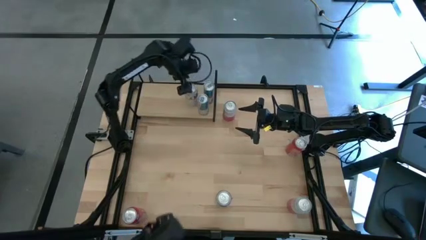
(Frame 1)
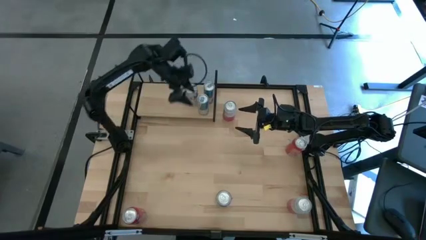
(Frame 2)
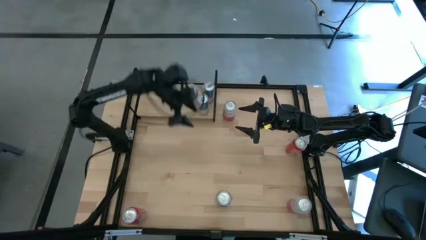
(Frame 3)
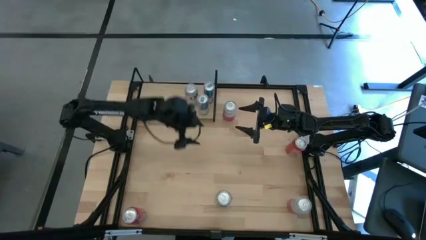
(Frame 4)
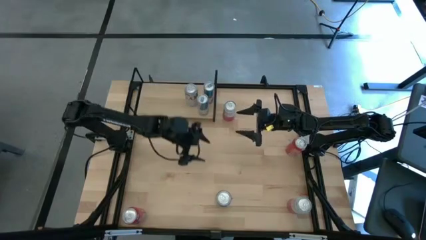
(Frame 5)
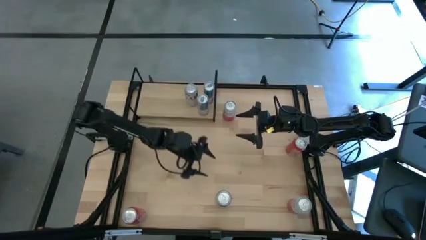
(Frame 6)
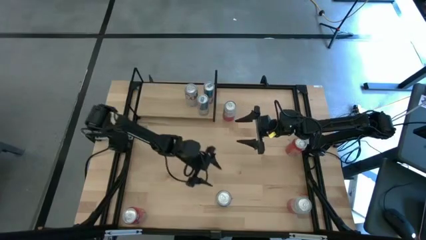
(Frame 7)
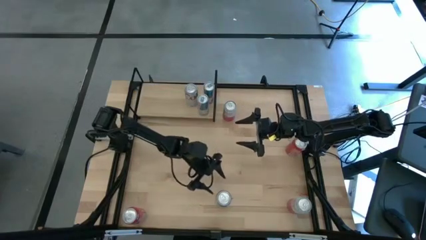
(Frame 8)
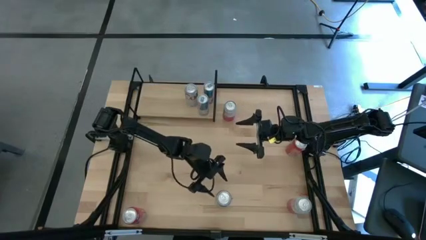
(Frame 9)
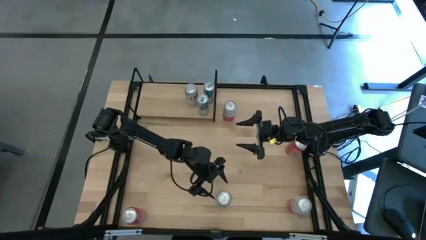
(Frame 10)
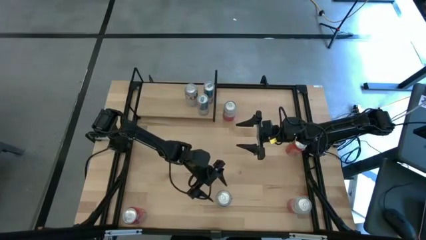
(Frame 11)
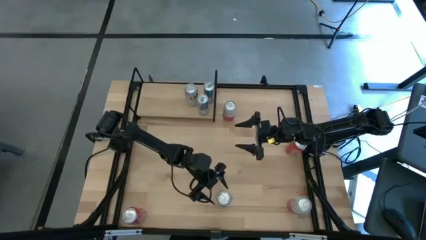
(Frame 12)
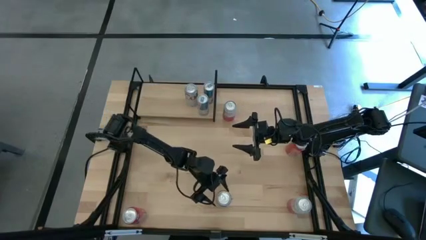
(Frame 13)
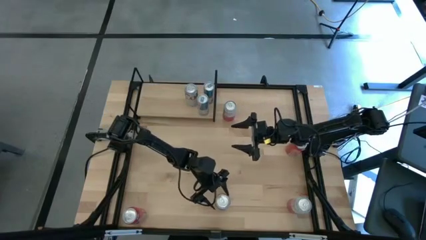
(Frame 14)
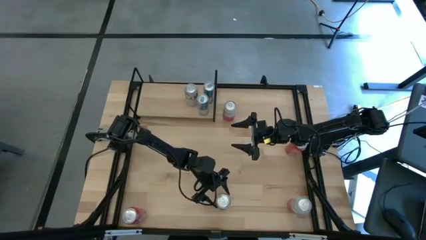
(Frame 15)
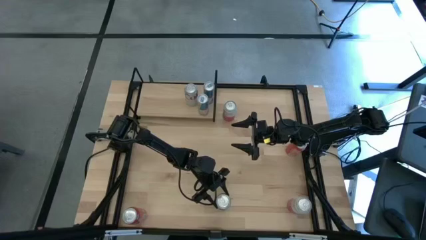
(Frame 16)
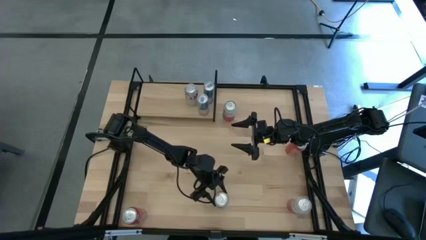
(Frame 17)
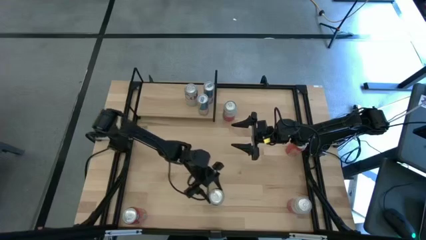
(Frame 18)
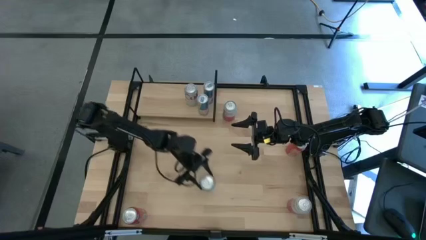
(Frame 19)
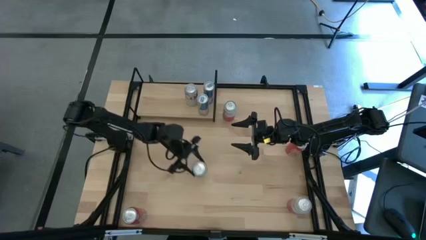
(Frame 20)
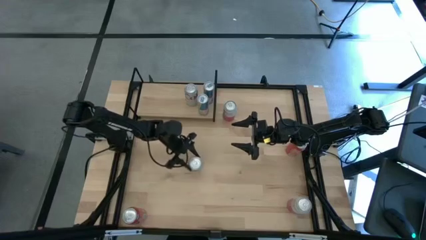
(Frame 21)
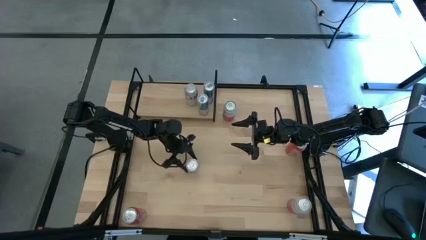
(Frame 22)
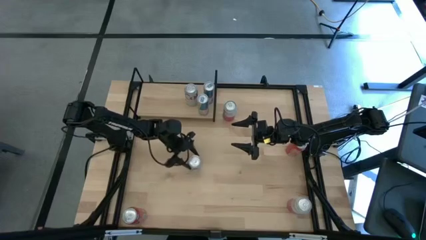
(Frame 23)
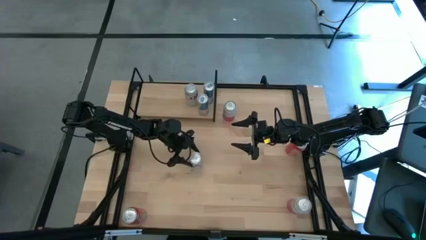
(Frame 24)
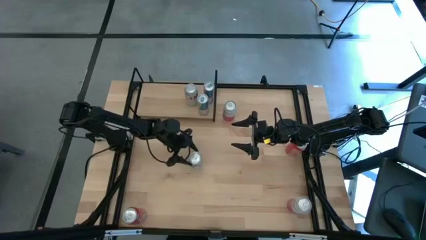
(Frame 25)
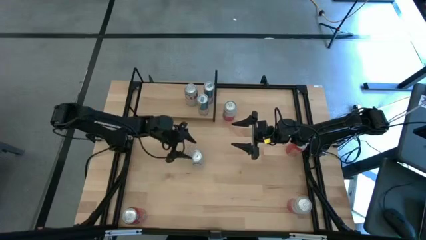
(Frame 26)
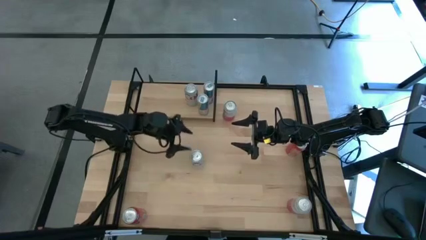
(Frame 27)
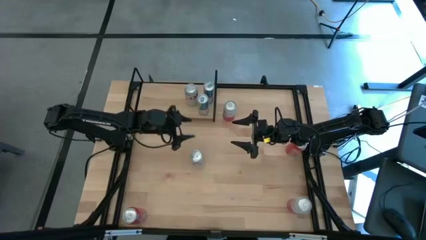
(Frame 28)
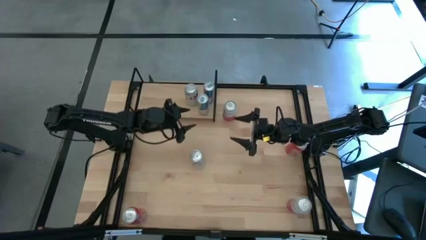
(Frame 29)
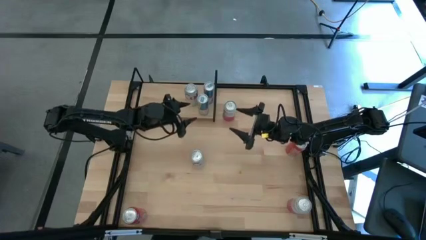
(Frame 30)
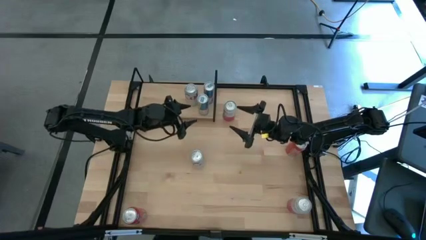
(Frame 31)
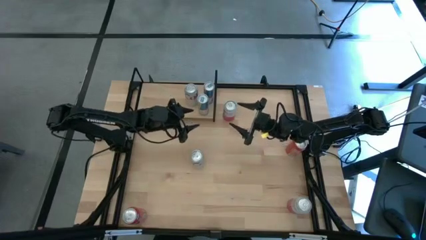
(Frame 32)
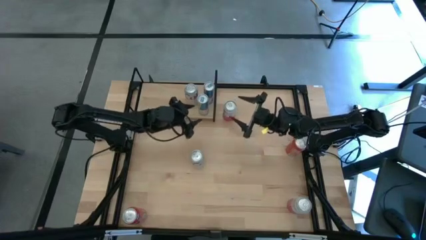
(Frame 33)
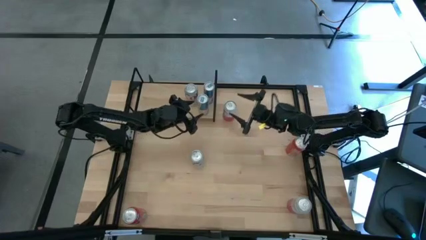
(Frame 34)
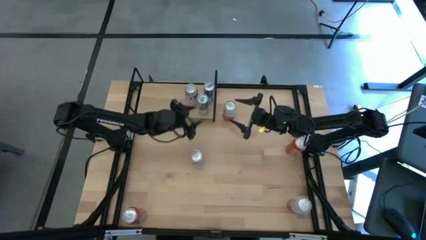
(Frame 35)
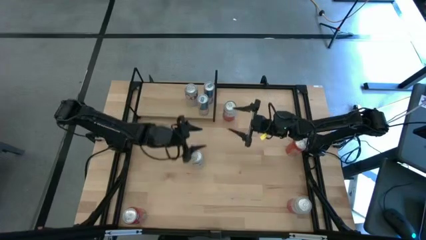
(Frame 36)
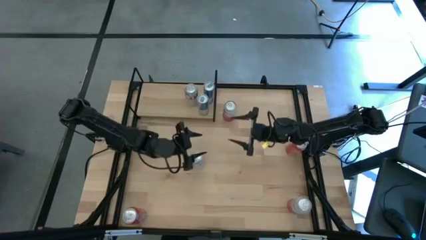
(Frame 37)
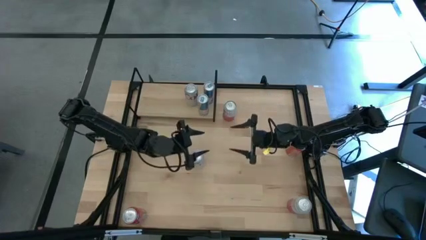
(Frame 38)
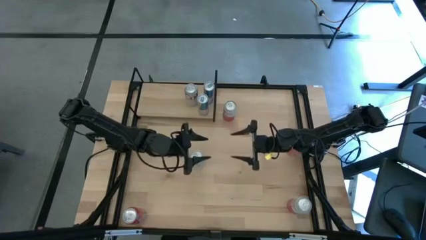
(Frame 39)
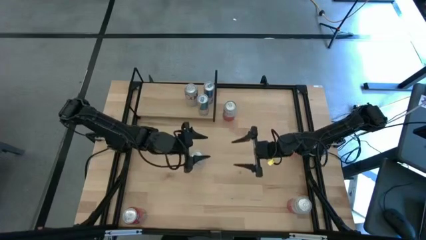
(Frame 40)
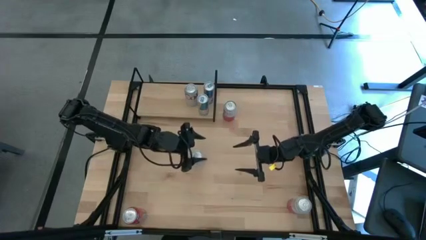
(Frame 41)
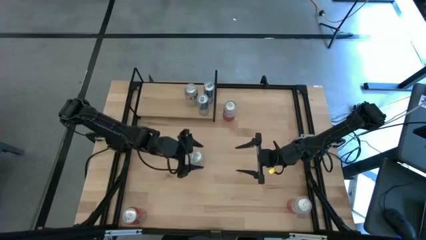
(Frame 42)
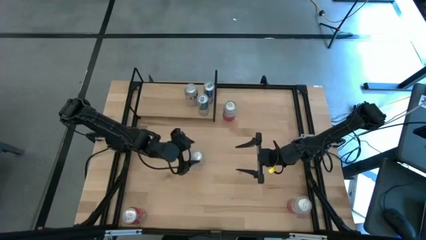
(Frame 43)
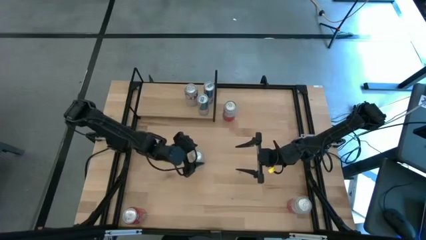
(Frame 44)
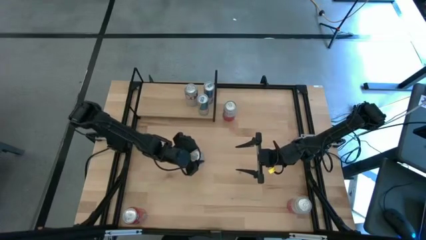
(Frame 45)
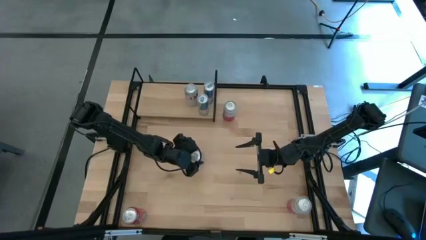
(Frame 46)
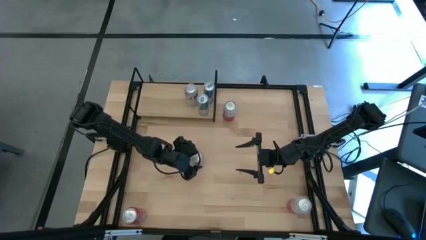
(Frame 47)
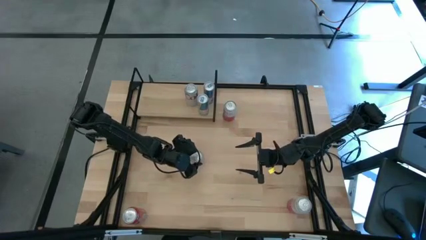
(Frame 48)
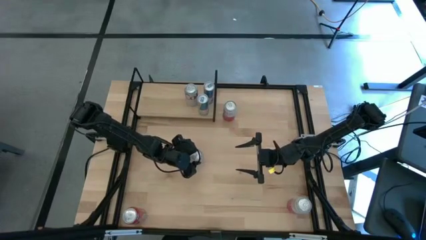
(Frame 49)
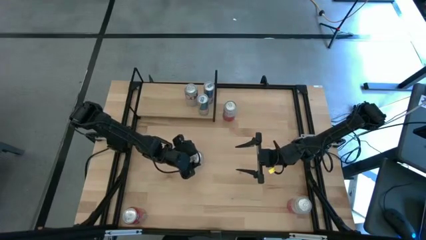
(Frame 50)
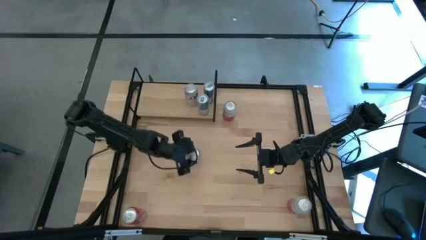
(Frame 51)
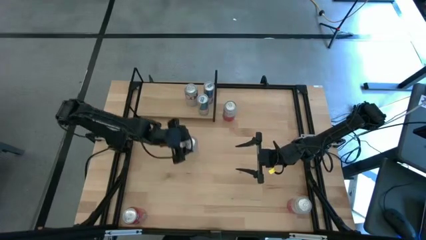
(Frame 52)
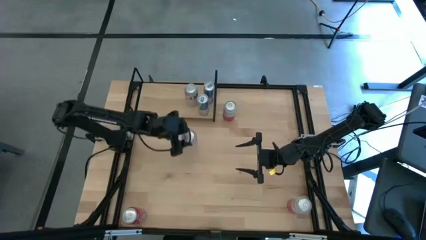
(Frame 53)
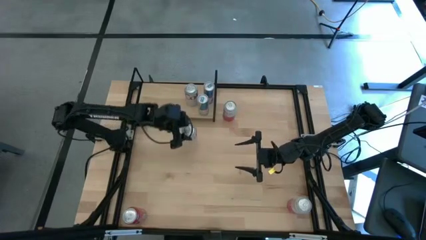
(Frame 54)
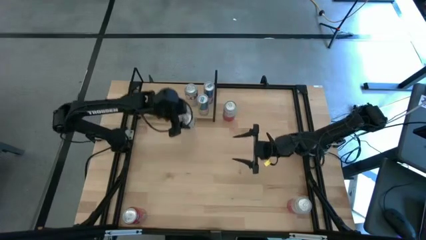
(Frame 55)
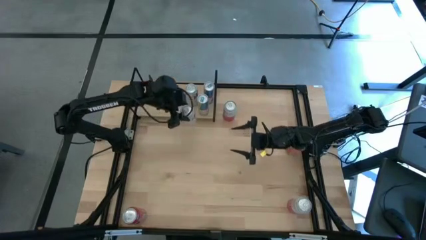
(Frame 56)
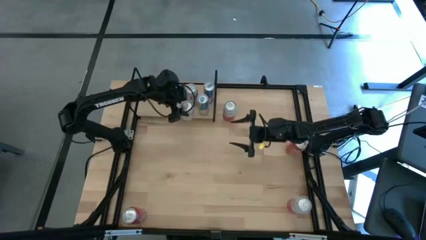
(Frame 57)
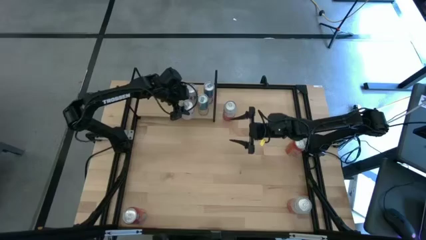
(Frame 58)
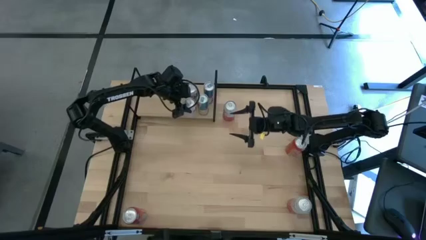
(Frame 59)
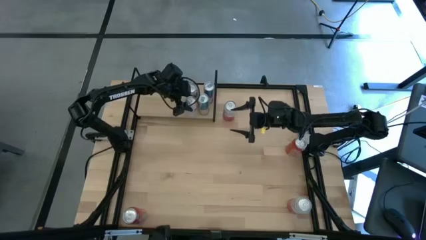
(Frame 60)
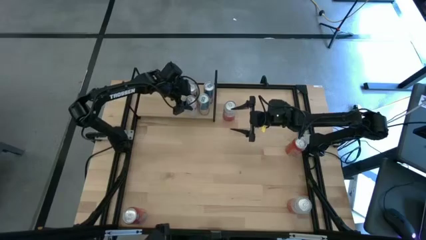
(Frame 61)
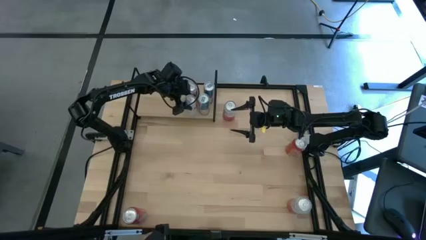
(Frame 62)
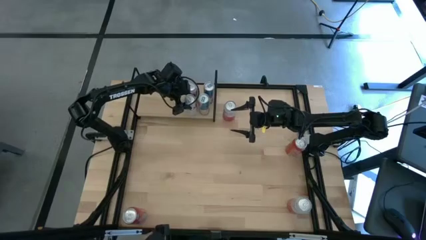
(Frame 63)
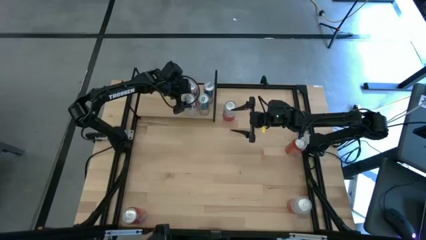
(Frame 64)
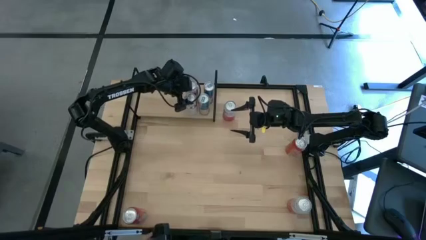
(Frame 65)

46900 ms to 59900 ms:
Task: Place canned beverage on shelf
Put the red and silver soda can on the shelf aligned with other red and silver soda can

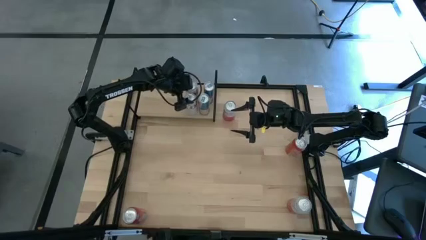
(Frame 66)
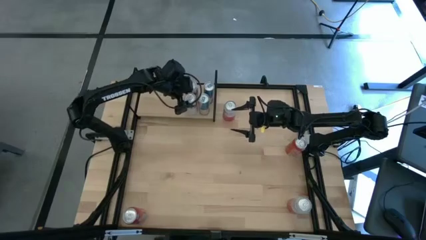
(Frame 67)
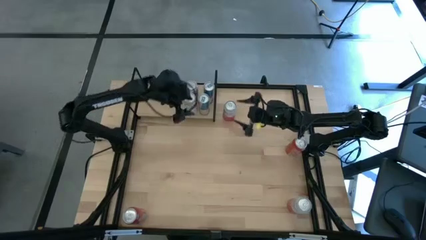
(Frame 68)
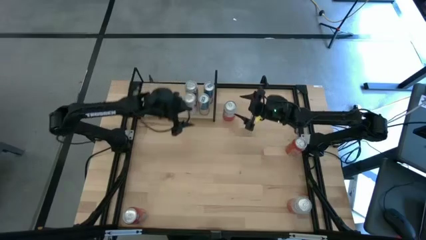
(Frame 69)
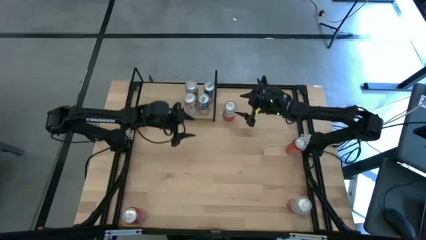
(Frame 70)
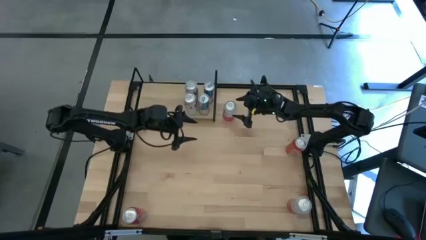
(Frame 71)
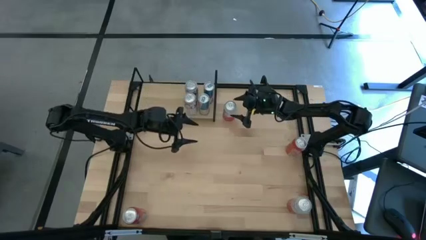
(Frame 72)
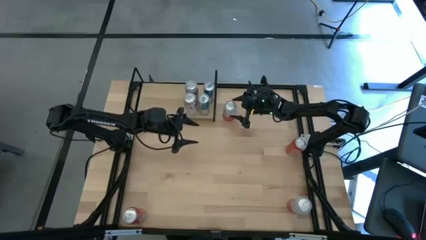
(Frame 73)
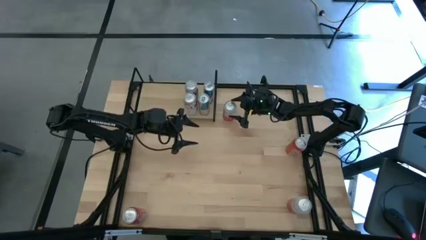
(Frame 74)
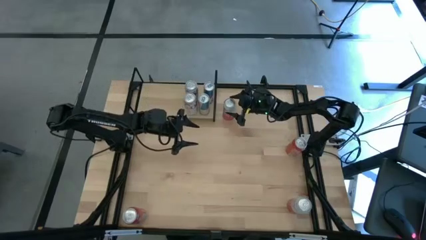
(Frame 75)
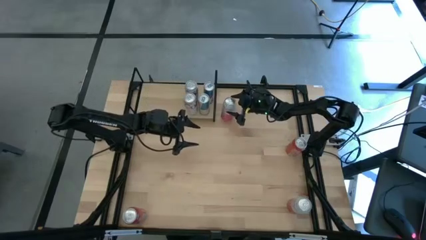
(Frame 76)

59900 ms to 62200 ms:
Put the top pink soda can on the shelf
